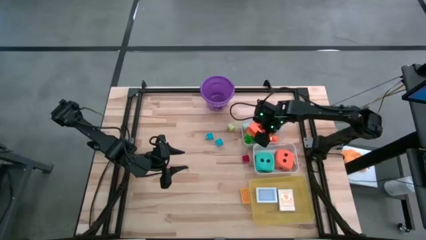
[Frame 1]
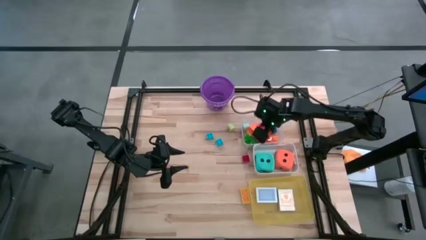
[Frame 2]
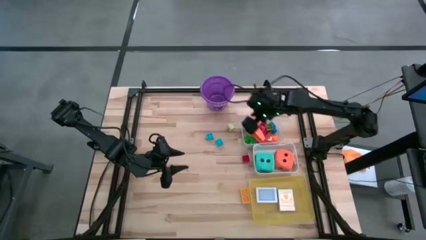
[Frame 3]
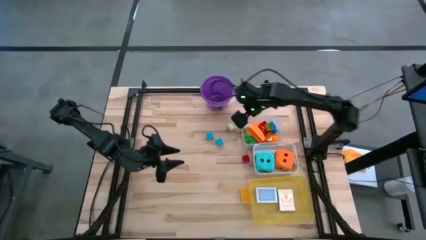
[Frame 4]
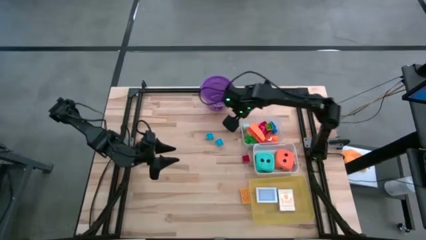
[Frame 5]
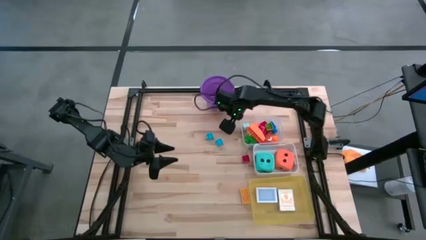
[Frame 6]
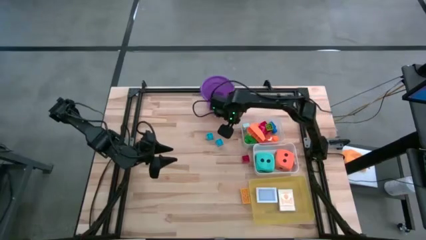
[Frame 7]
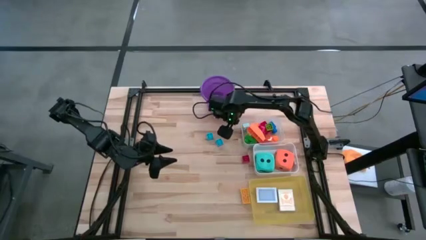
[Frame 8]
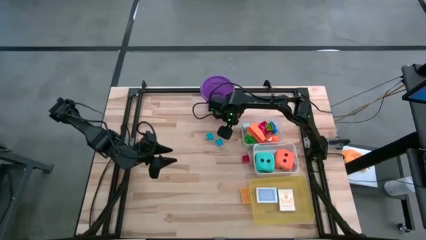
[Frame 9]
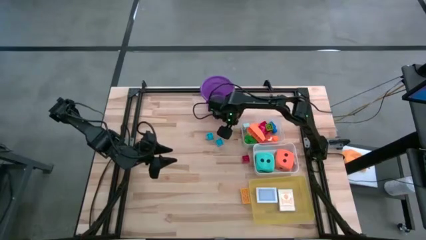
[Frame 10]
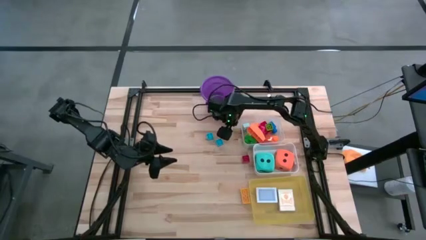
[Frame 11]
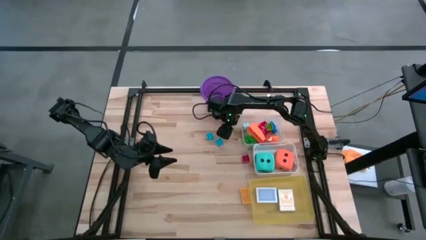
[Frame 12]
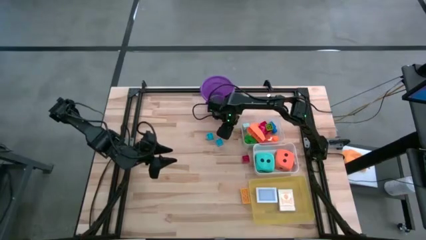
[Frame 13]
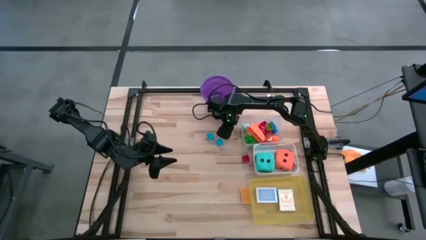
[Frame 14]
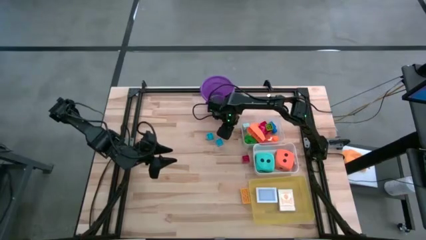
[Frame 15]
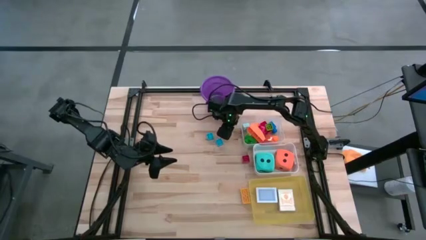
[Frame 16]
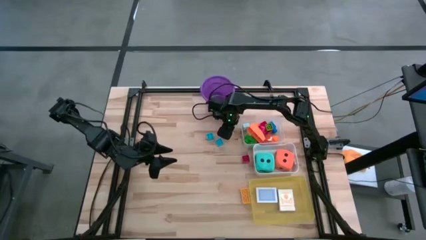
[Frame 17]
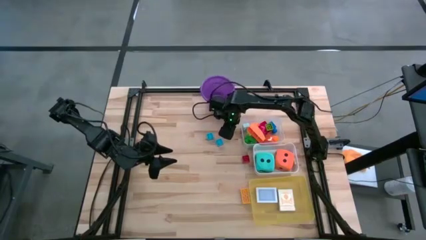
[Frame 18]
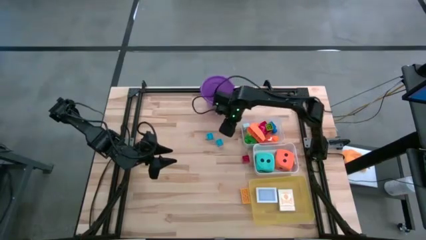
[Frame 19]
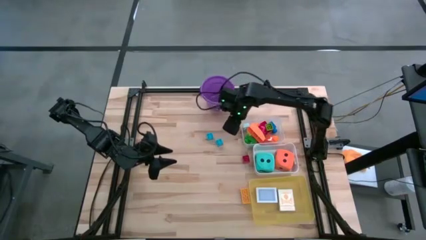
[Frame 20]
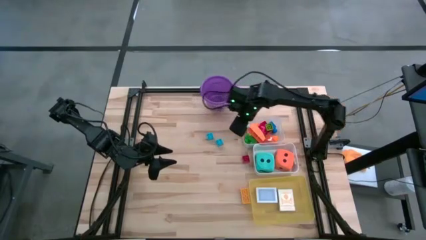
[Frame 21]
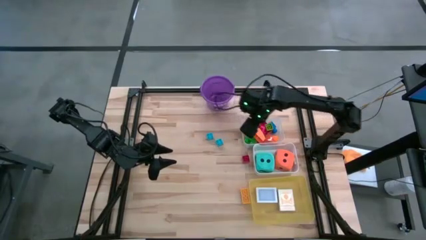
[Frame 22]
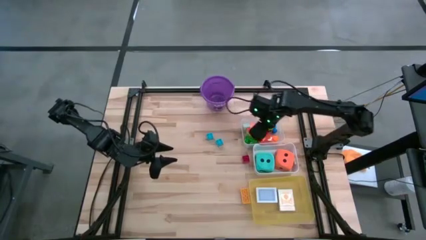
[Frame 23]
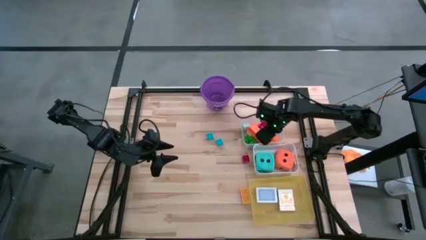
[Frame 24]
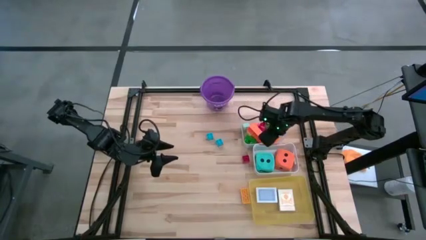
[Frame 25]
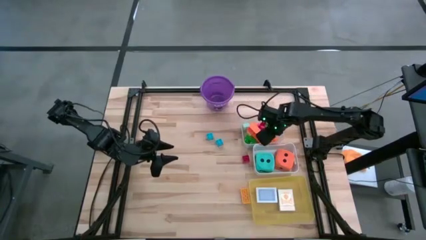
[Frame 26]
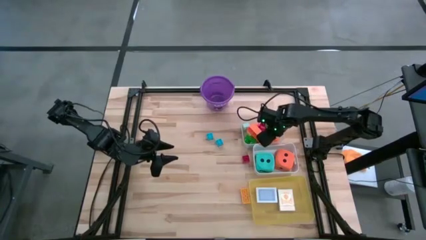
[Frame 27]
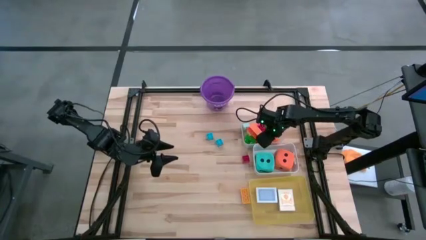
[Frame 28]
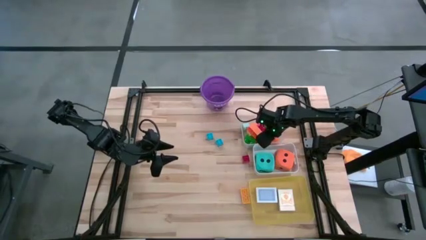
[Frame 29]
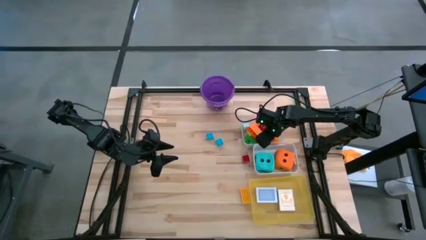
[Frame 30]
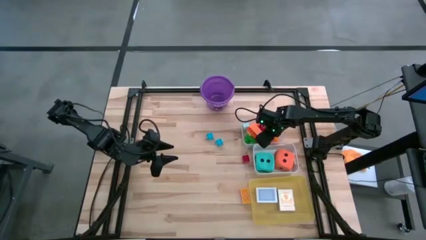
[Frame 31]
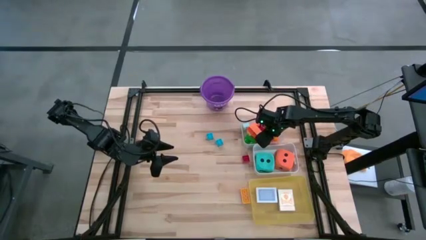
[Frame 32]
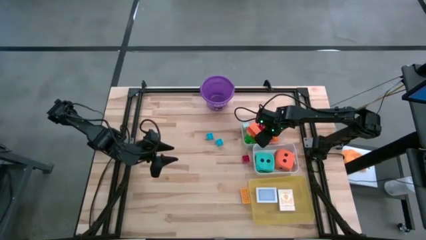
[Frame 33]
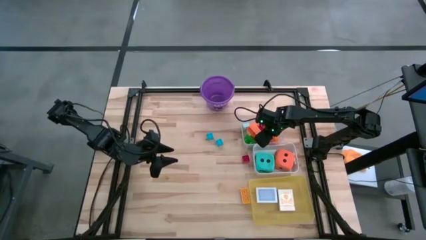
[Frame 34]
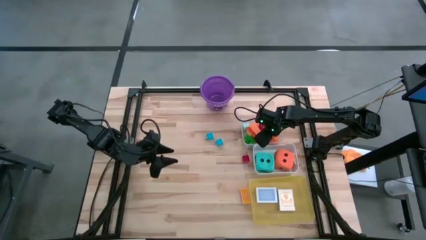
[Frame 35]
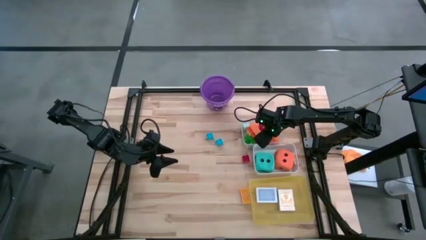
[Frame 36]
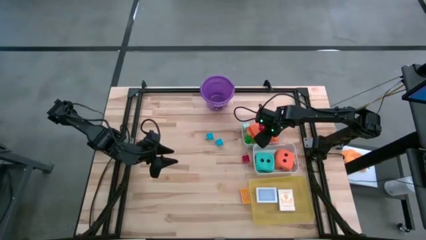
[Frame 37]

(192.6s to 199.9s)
Task: Pick & Place Toys
Put the light green game piece into the transparent bin

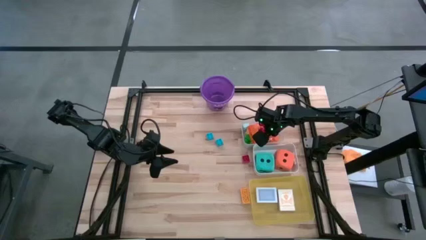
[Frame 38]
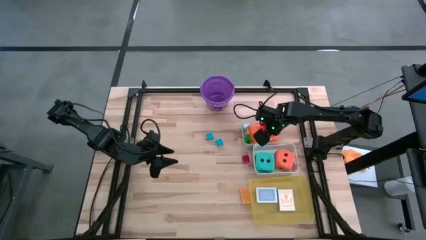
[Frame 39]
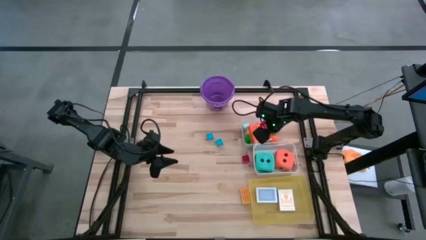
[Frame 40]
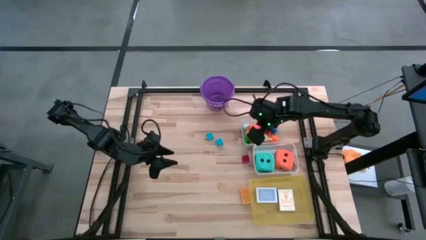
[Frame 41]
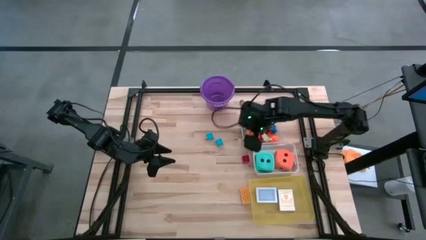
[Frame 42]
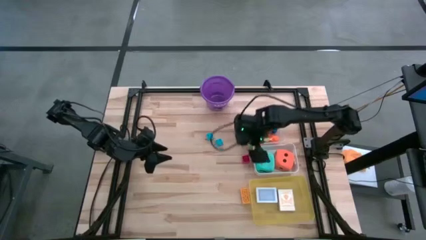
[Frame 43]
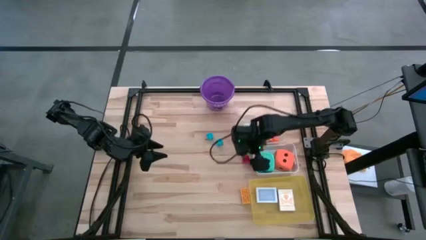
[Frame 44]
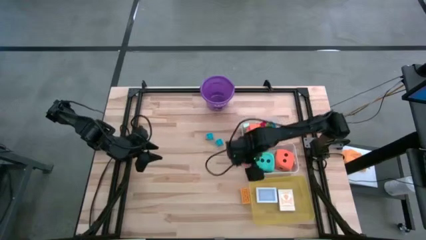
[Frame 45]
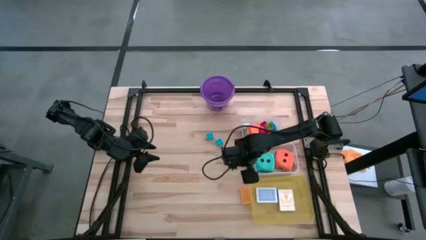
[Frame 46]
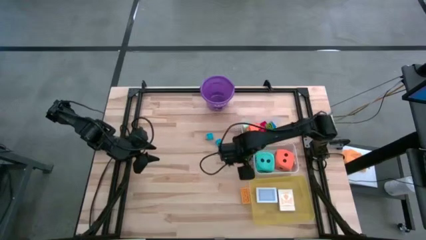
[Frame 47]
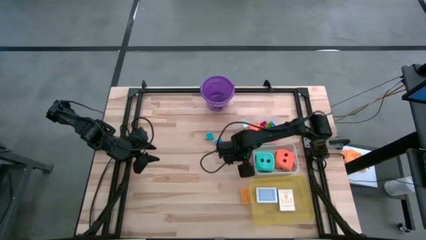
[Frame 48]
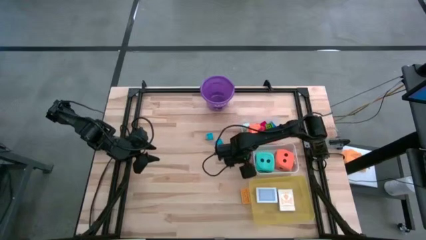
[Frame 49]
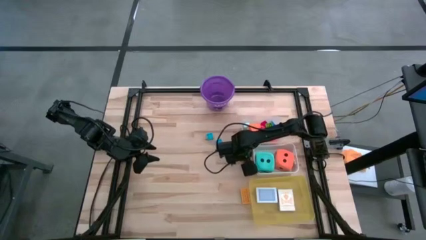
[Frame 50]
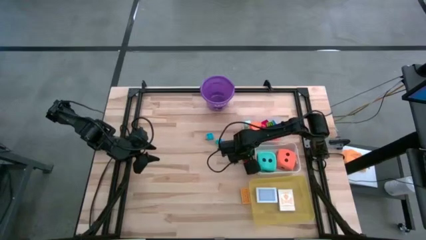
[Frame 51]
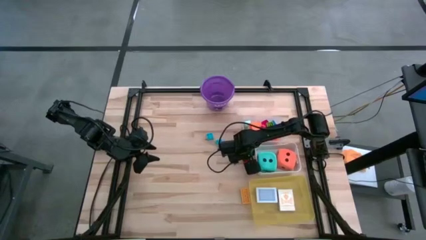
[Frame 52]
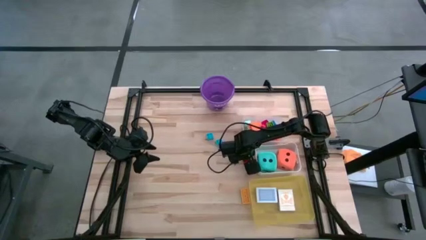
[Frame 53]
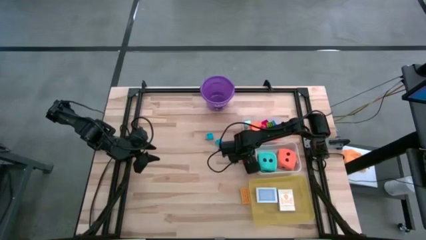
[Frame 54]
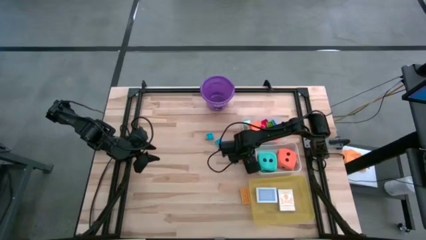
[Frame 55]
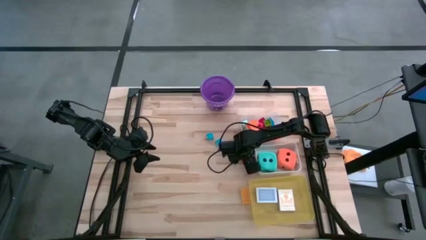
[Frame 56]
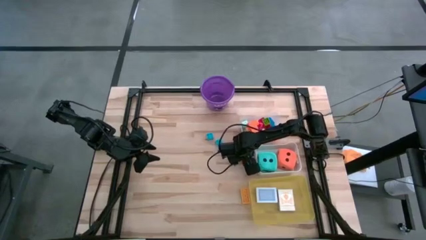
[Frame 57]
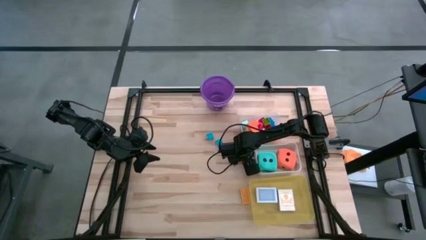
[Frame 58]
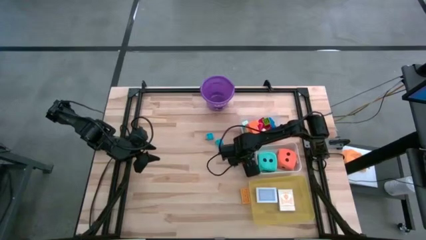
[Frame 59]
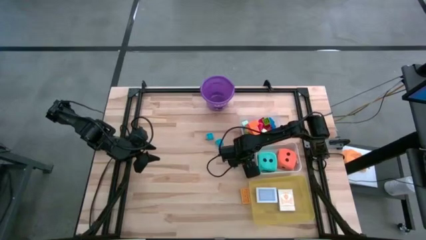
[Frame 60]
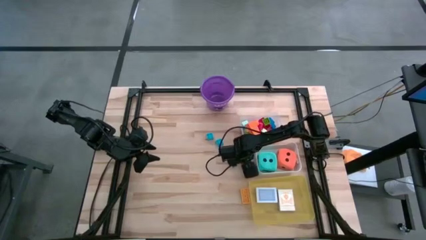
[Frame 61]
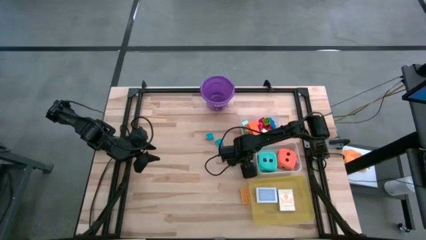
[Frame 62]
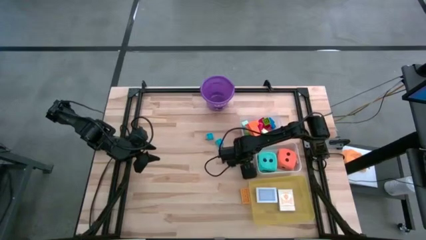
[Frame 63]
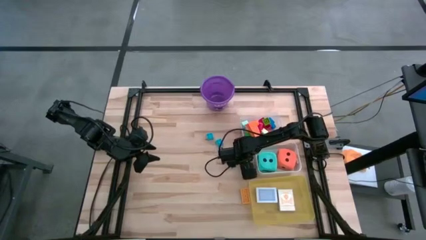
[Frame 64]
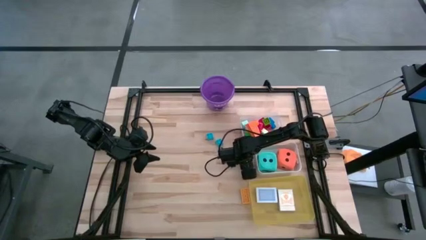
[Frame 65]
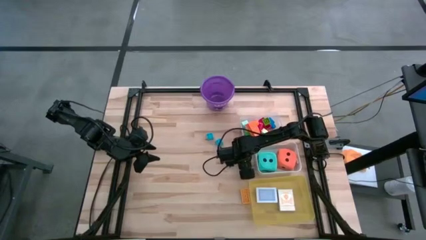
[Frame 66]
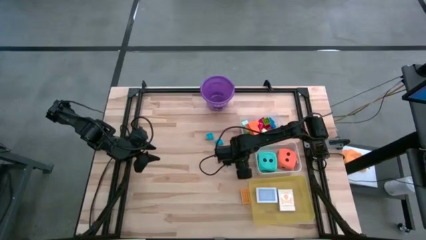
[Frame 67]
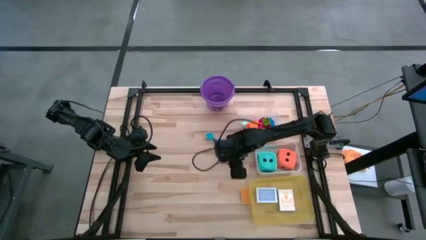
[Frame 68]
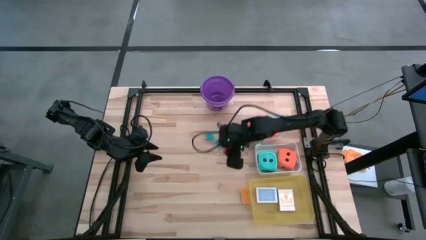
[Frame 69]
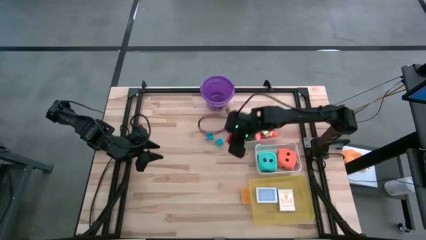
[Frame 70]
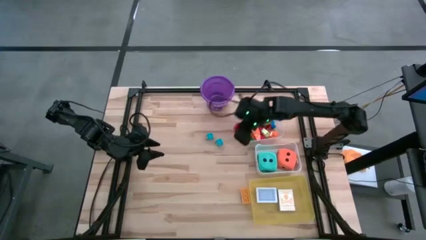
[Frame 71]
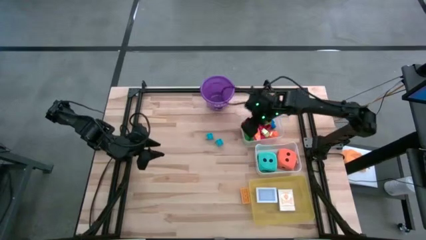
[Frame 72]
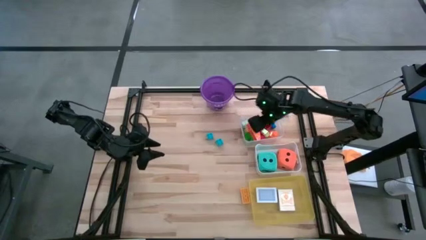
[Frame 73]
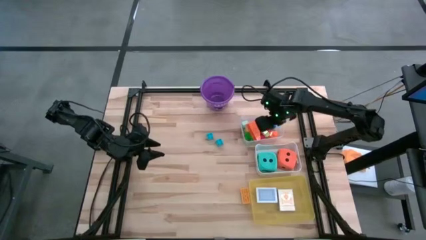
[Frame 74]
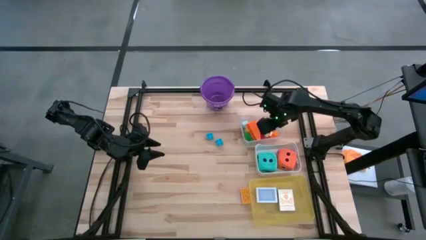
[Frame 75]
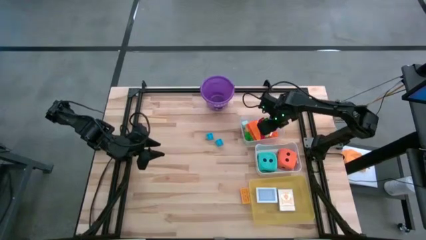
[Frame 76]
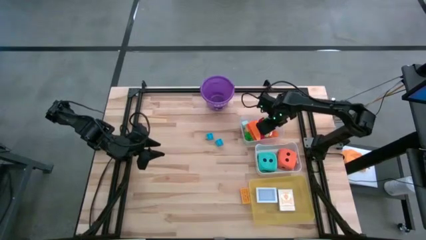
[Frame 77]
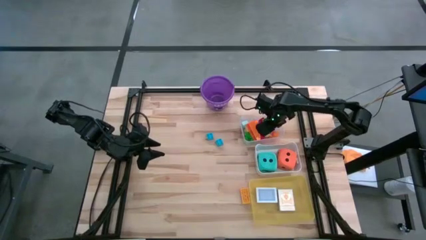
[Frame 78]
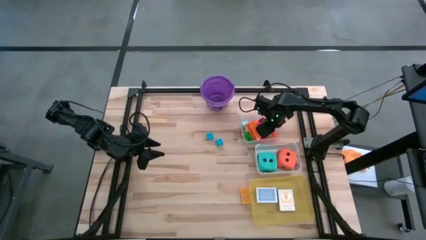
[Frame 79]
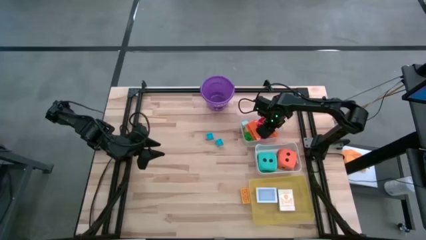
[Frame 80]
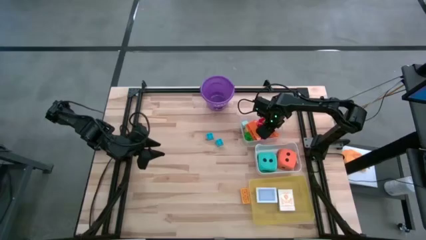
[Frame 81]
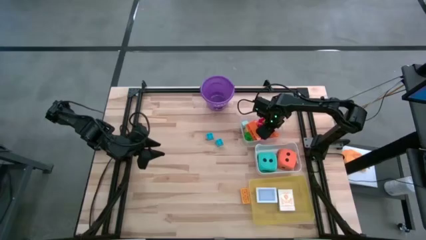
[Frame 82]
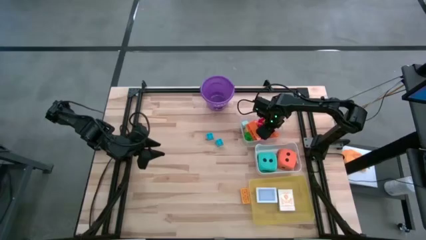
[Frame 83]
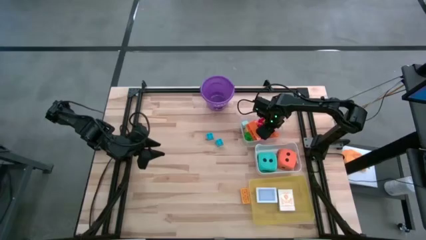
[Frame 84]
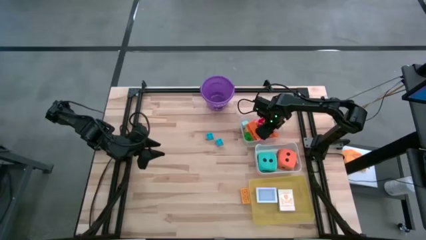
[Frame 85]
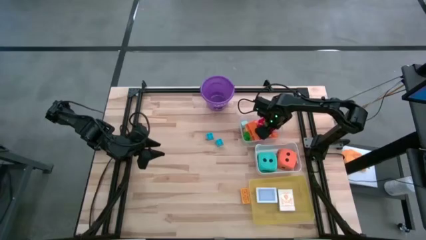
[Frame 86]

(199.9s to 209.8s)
Put the red game piece into the transparent bin

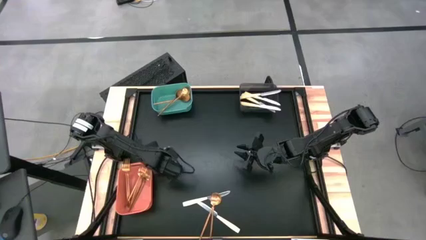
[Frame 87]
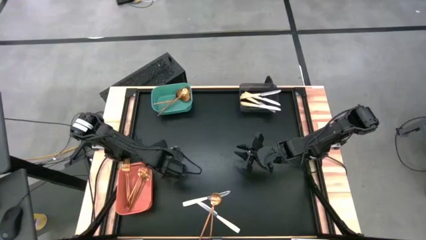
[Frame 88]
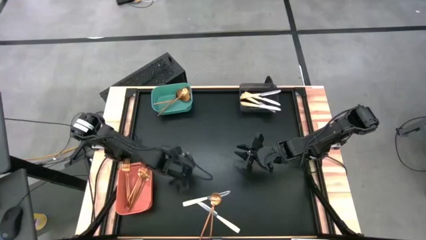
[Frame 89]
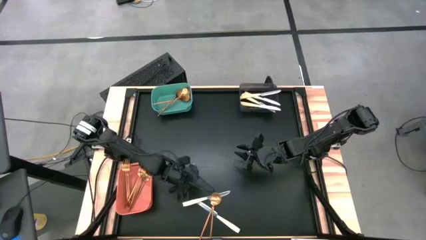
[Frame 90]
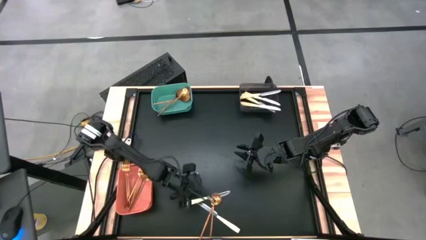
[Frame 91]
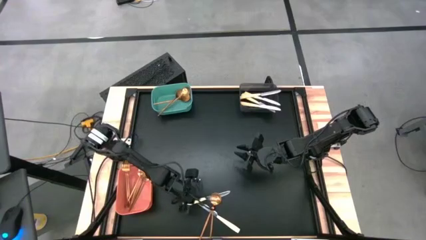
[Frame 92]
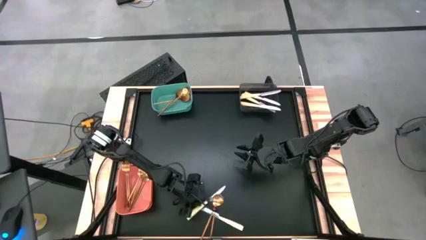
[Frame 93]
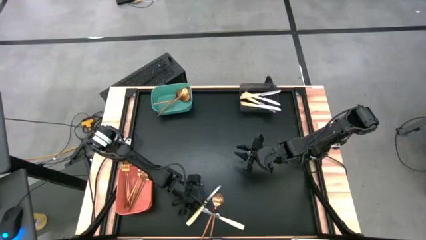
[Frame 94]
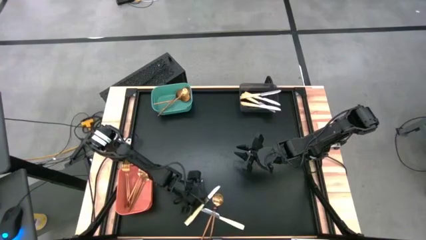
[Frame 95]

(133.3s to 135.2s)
Task: Sort silverware by color (type)
Put the yellow knife into the black bin
